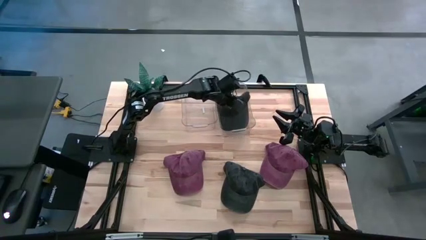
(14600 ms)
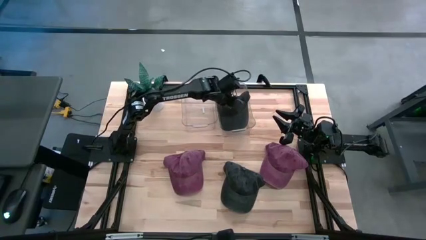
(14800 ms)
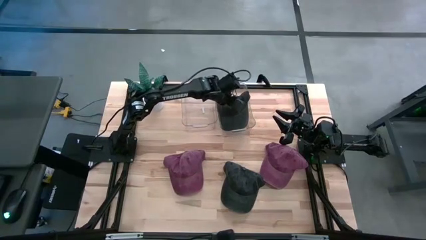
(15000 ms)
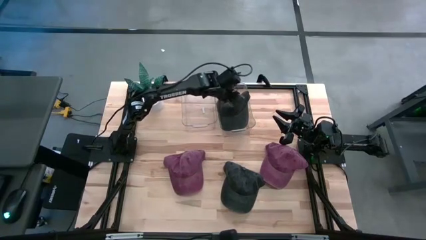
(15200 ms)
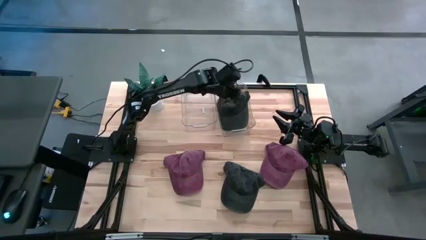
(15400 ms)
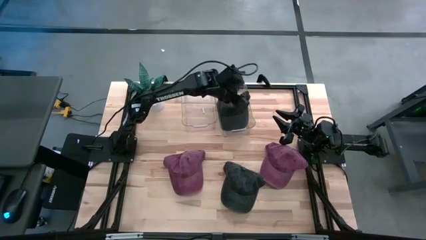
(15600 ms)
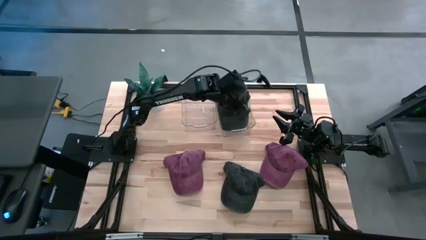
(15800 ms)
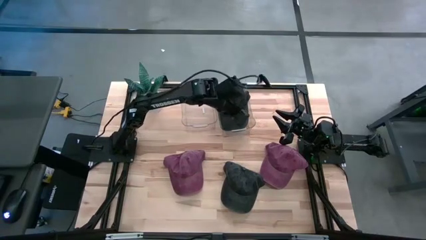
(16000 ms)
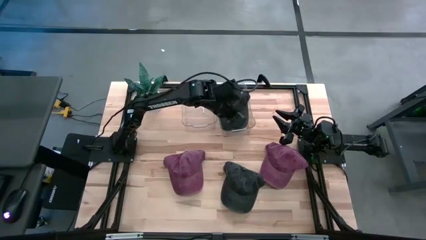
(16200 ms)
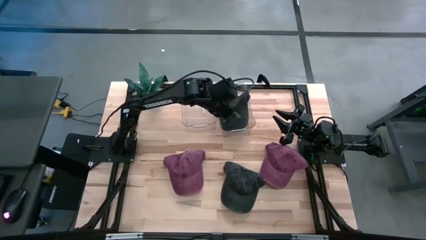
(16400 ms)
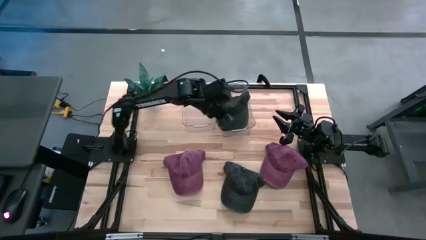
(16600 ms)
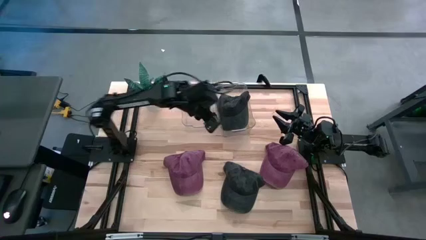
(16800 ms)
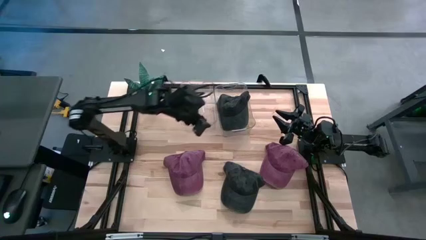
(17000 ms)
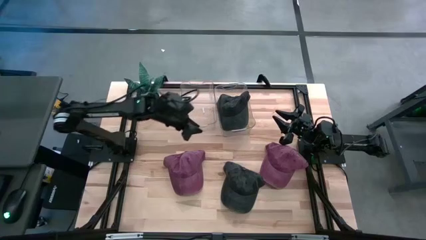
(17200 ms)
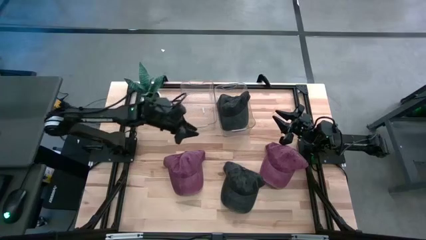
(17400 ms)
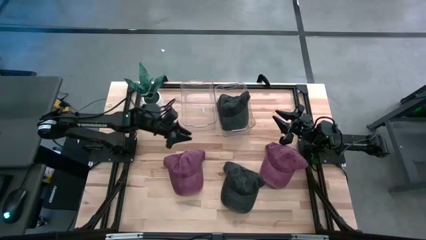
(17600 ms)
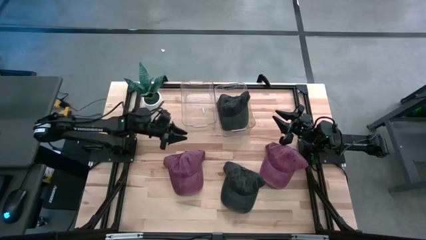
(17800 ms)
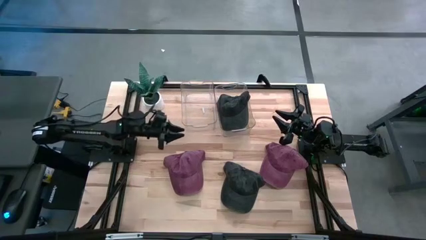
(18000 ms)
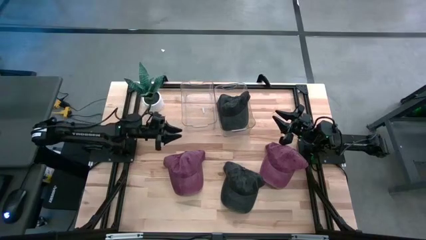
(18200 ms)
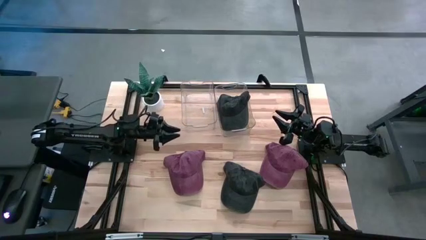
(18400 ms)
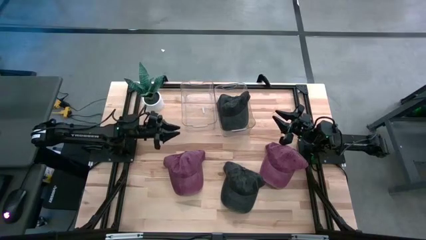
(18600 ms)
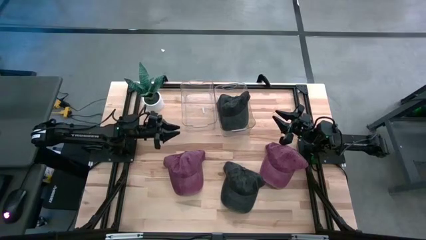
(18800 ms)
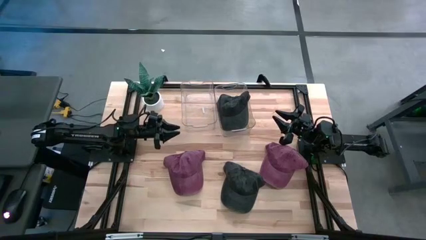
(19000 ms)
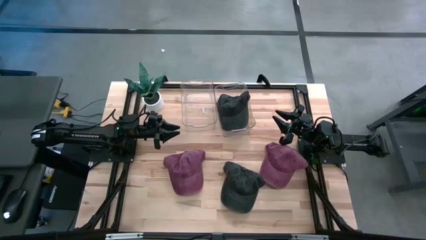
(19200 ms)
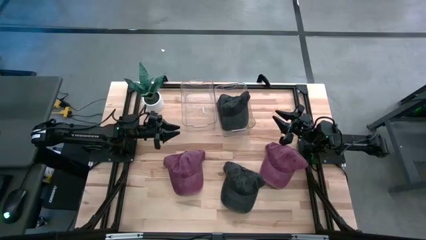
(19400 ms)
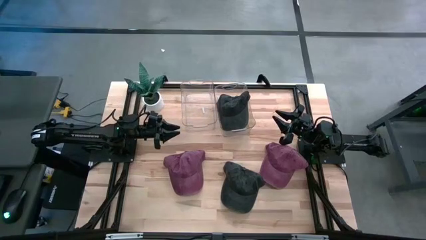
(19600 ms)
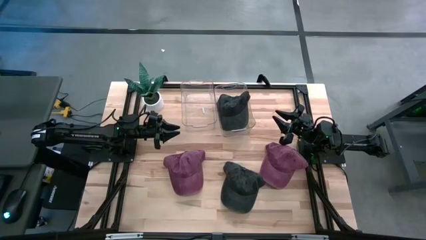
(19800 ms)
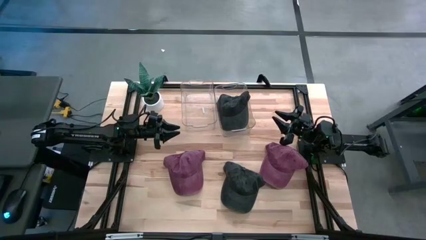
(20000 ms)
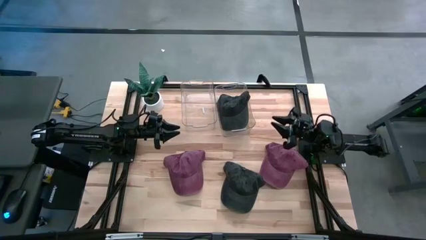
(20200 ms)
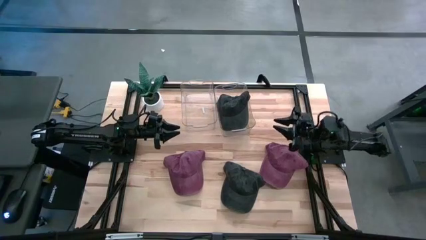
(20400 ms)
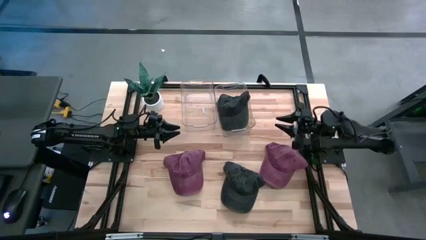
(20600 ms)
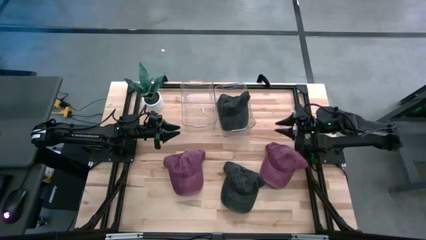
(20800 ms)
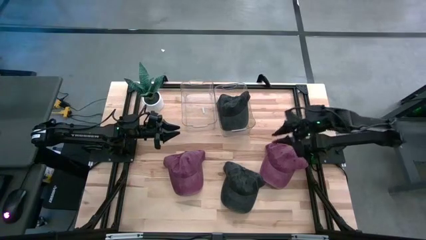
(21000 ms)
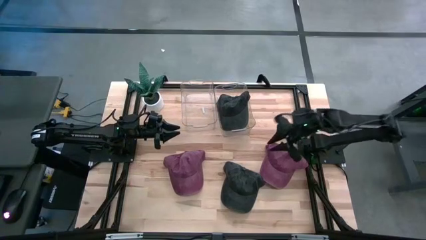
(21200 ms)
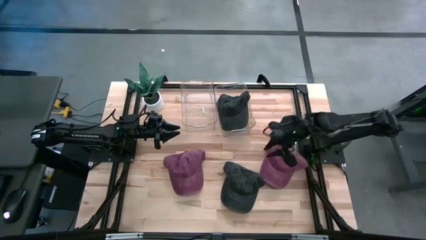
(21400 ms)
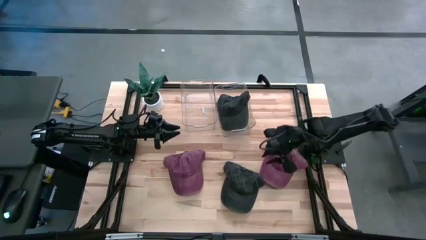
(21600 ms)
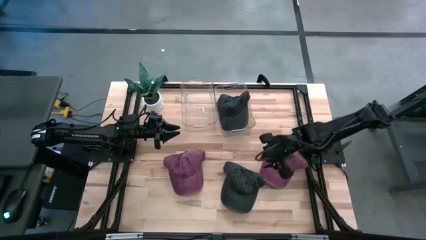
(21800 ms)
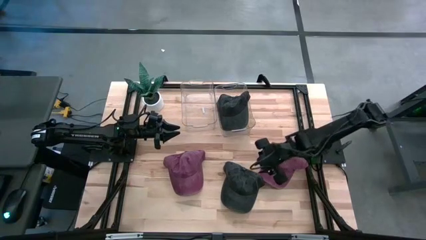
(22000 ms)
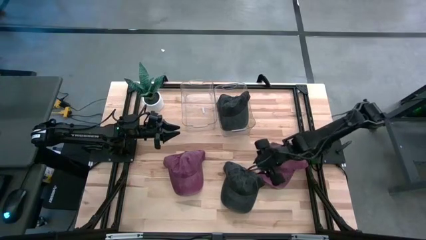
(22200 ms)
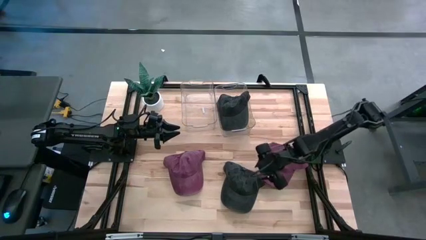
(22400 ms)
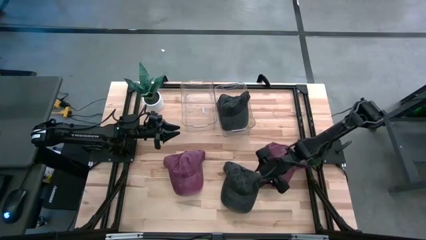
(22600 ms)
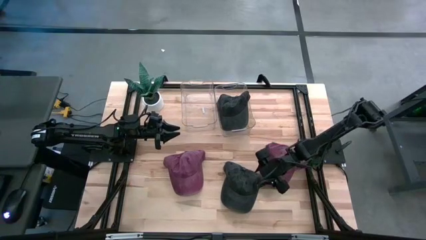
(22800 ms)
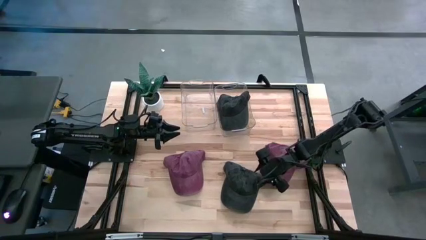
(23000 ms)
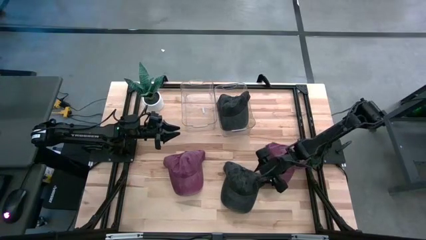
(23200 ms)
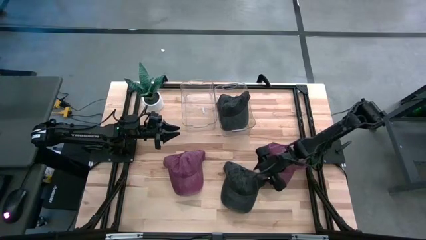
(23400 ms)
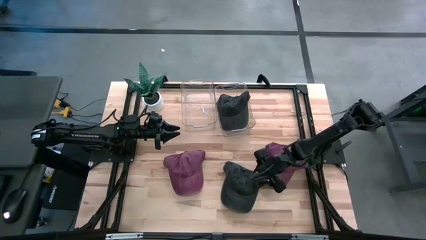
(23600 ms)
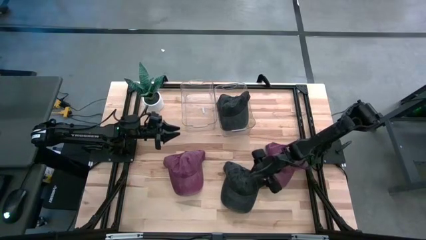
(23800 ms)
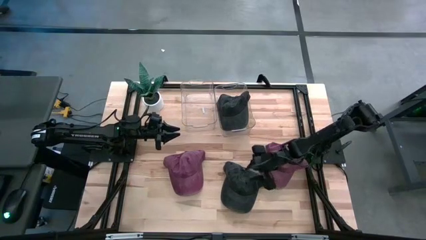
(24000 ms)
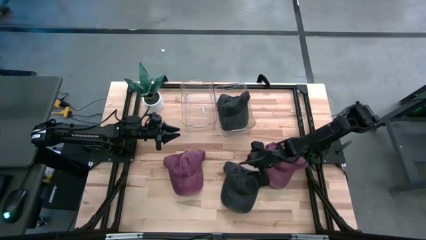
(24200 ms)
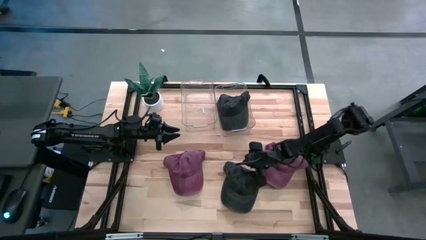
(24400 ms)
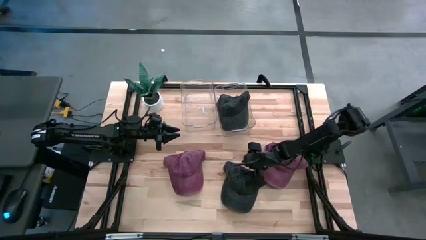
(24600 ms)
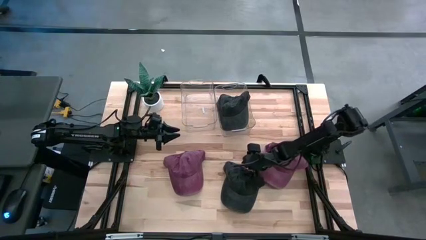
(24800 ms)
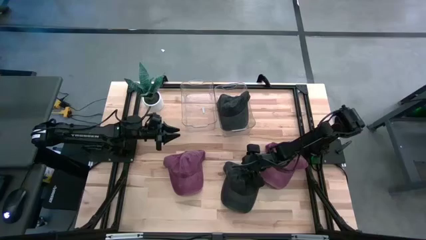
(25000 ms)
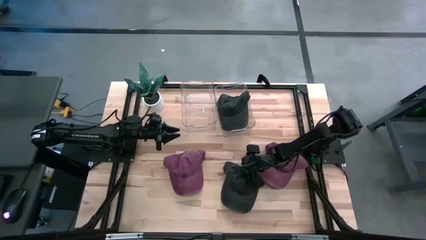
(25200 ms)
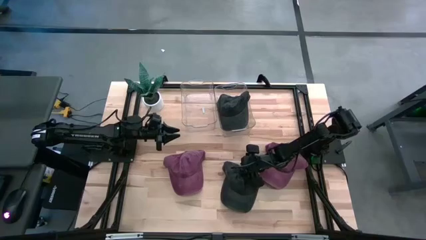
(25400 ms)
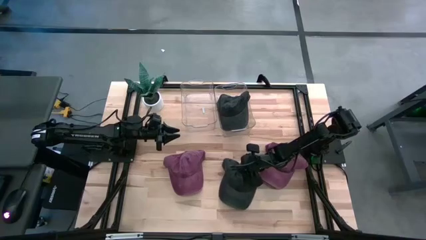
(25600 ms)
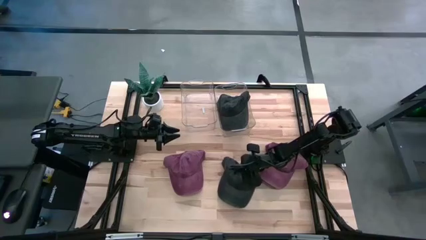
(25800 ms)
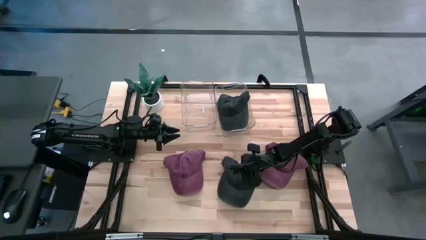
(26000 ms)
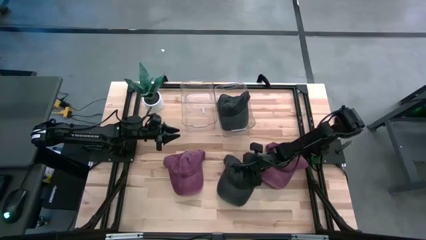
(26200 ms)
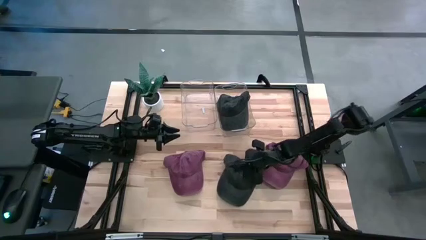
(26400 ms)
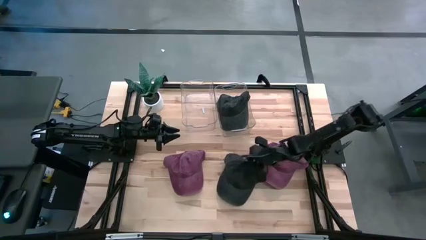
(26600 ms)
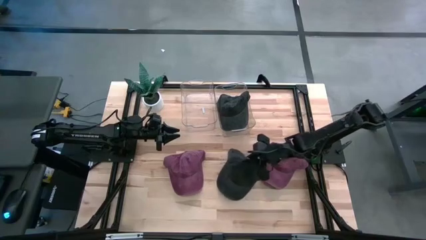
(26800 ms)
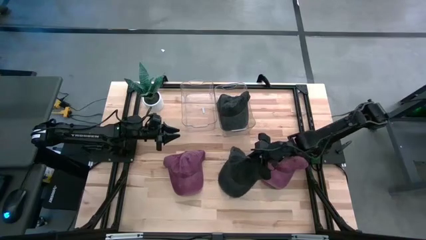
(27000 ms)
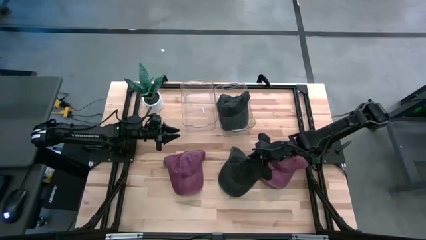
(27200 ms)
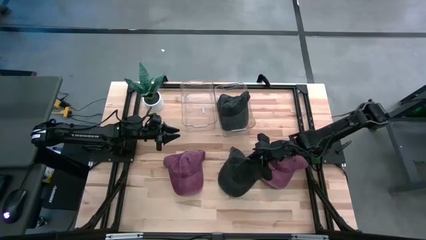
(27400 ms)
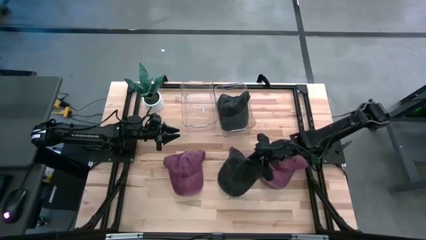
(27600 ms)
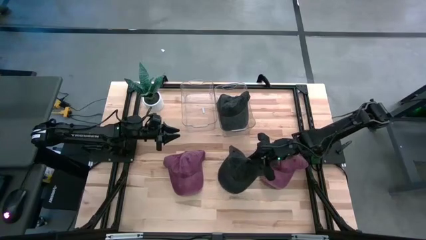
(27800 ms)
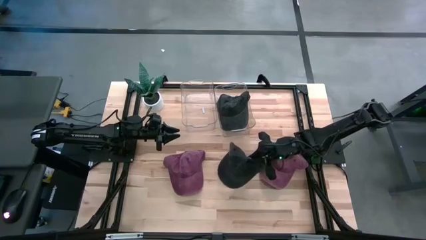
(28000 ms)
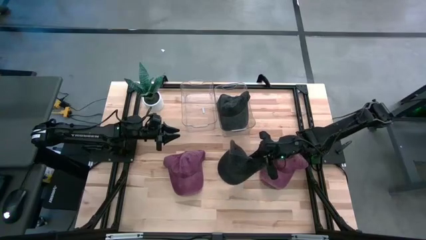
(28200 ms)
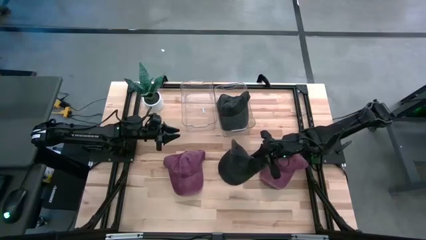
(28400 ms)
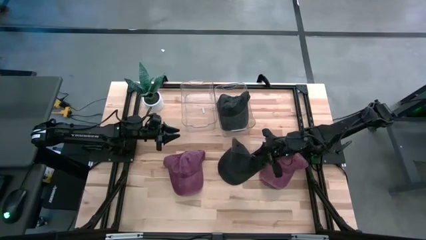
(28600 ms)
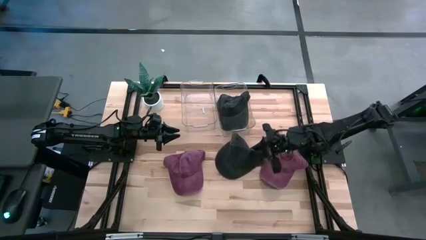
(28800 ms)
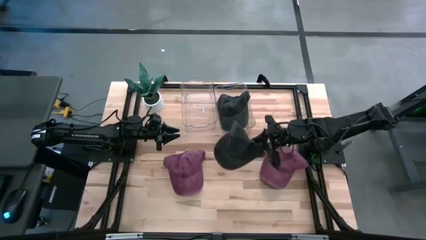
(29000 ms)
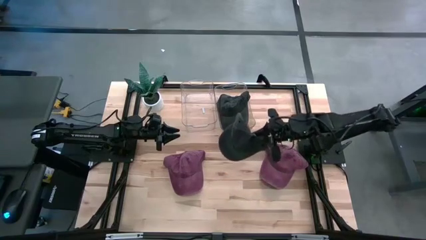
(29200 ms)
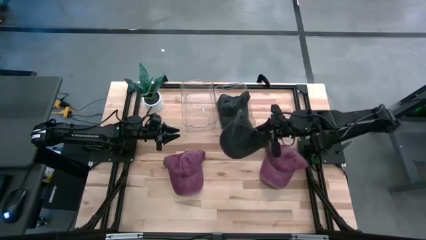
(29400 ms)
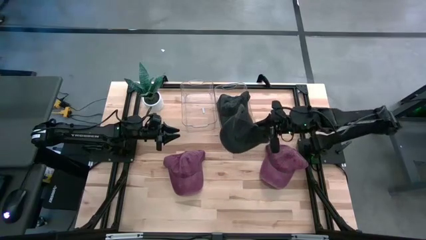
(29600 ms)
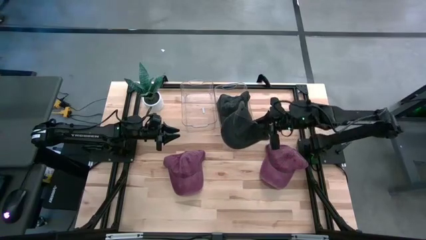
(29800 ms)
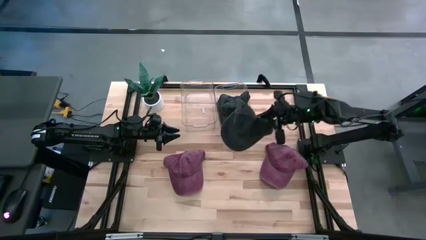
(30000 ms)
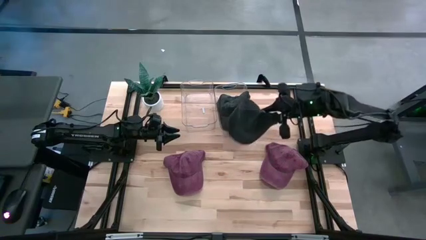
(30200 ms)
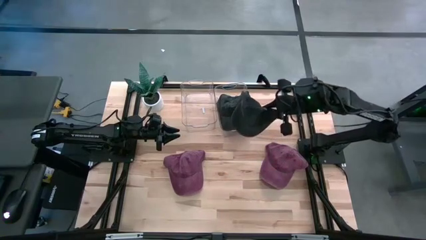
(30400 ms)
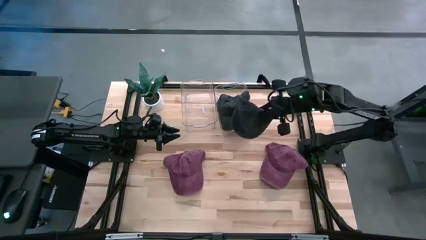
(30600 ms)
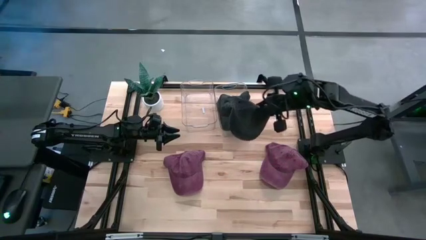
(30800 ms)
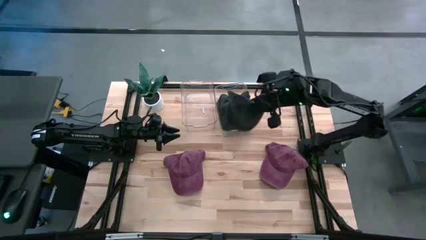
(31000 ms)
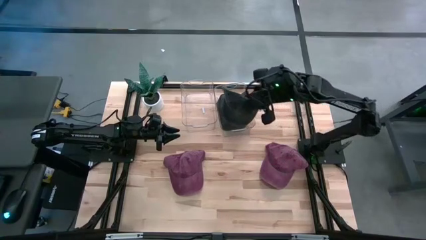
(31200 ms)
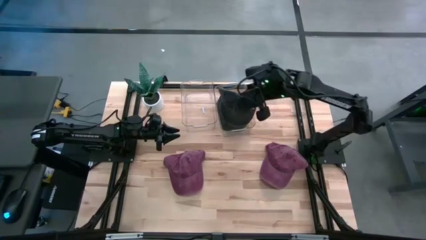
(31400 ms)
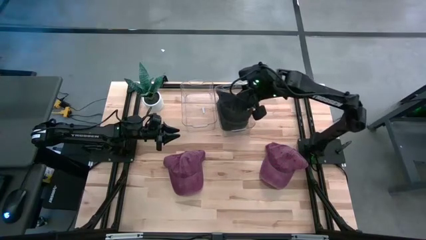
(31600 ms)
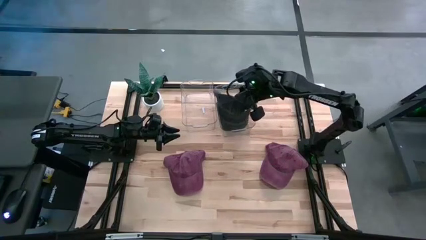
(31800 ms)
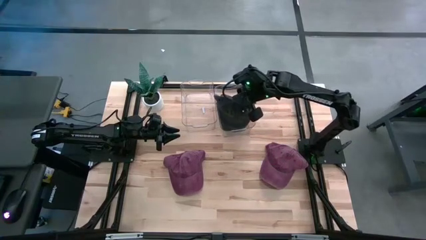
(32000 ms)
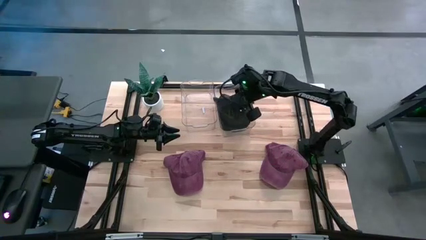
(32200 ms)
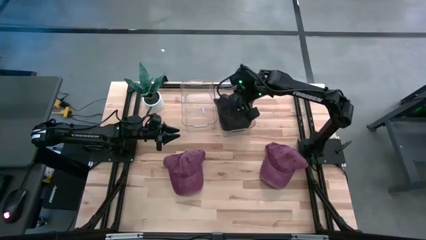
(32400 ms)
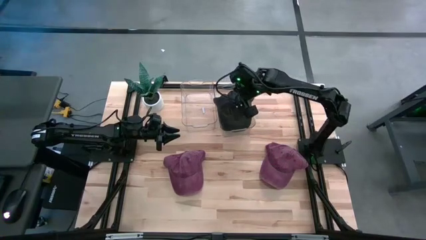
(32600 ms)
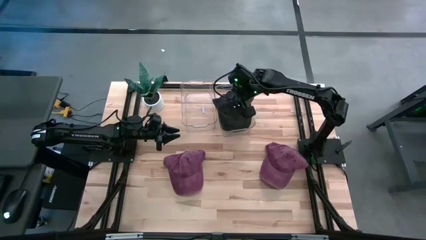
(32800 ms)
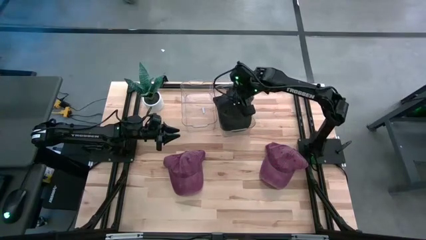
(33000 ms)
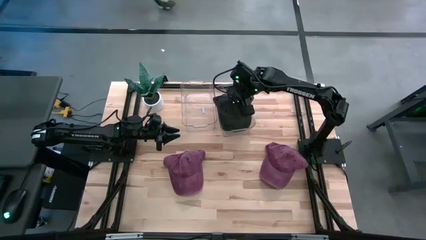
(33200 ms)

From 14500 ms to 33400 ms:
Task: Pick & Place hat
Put the black cap into the right transparent bin
